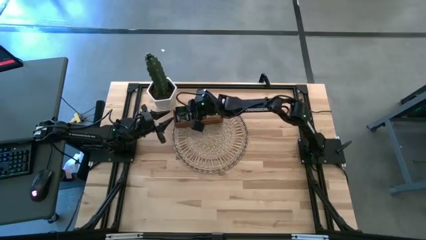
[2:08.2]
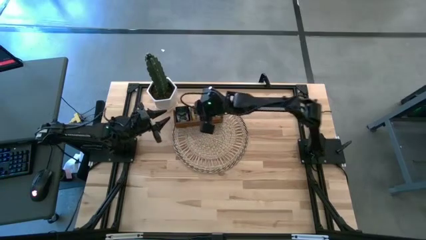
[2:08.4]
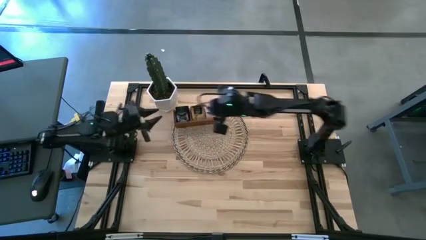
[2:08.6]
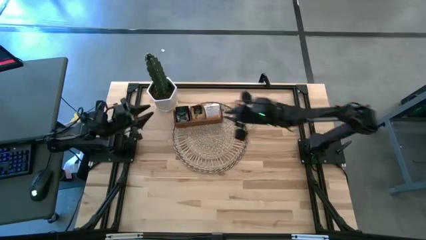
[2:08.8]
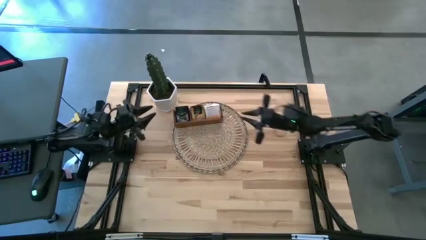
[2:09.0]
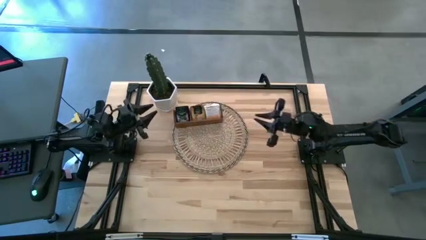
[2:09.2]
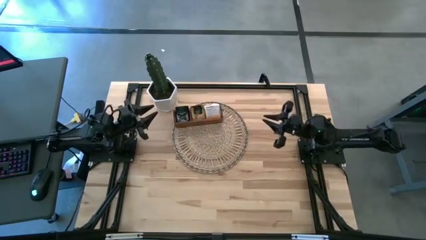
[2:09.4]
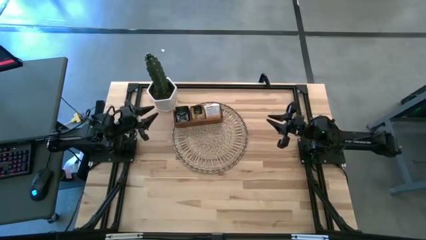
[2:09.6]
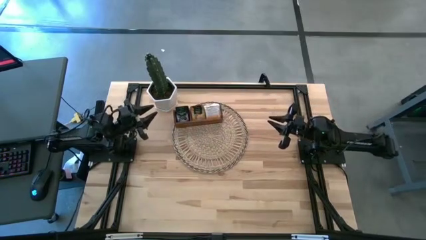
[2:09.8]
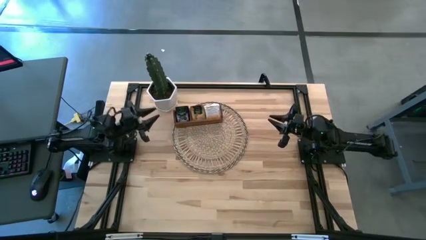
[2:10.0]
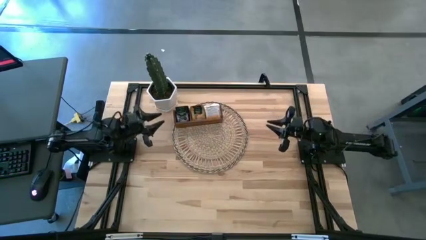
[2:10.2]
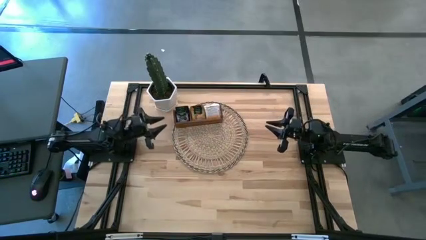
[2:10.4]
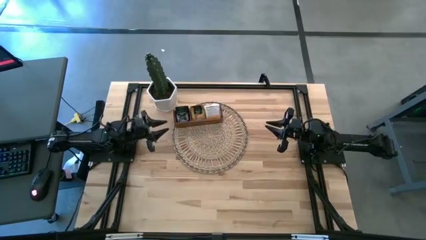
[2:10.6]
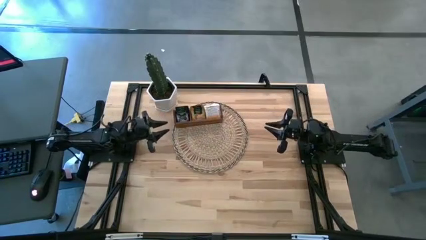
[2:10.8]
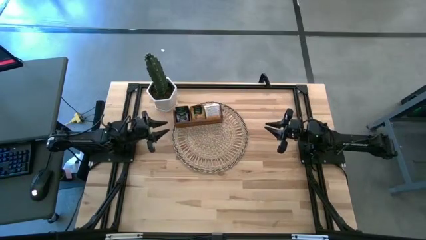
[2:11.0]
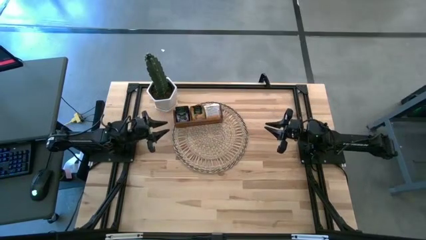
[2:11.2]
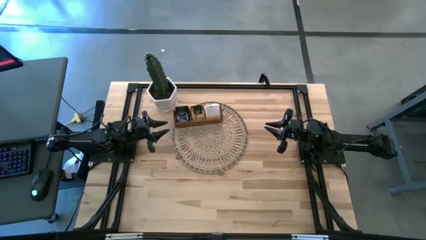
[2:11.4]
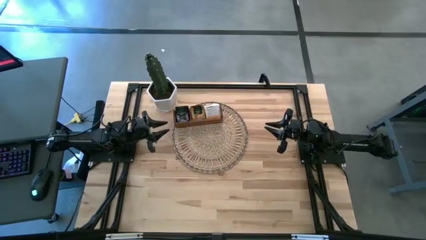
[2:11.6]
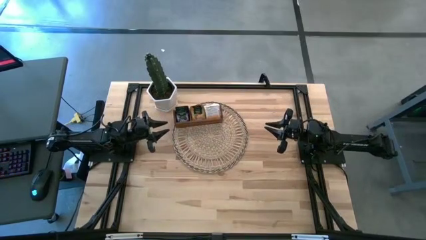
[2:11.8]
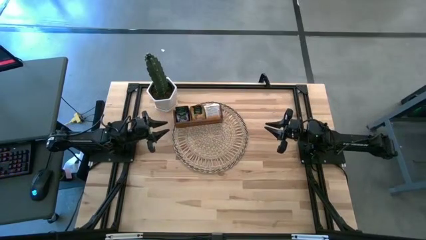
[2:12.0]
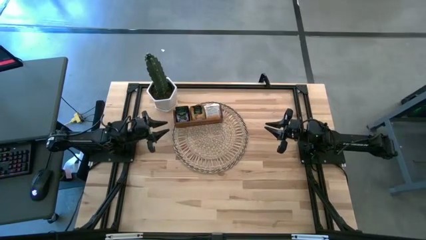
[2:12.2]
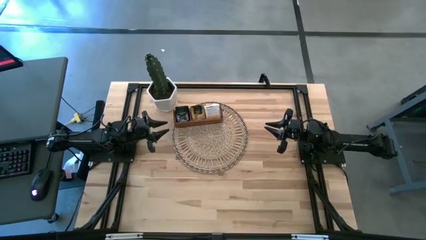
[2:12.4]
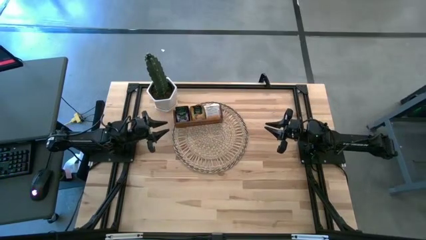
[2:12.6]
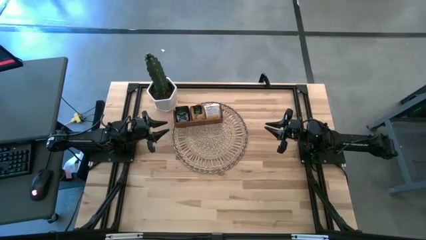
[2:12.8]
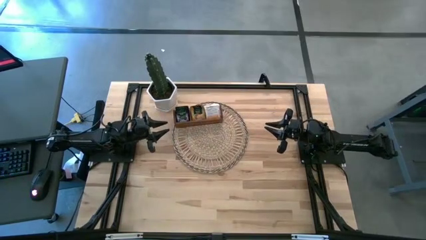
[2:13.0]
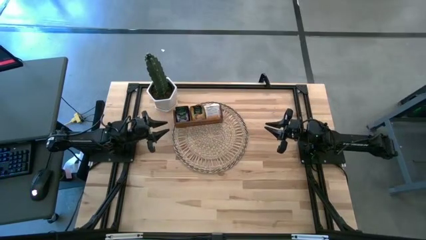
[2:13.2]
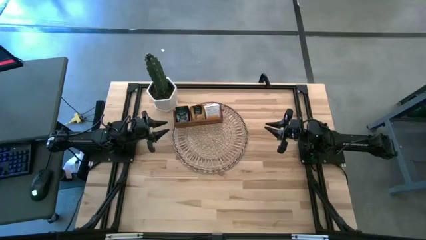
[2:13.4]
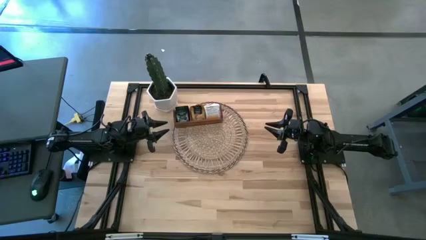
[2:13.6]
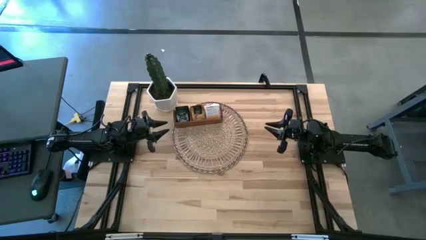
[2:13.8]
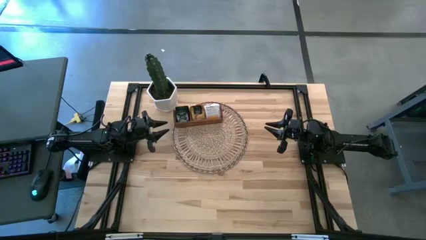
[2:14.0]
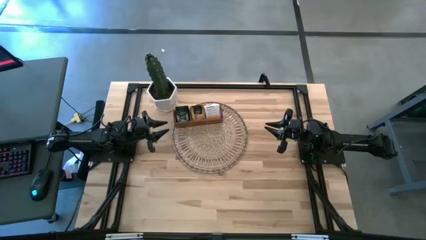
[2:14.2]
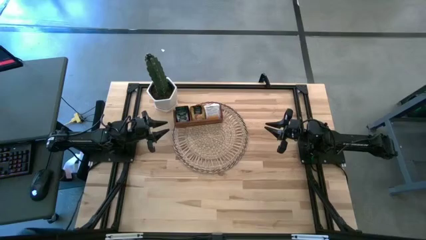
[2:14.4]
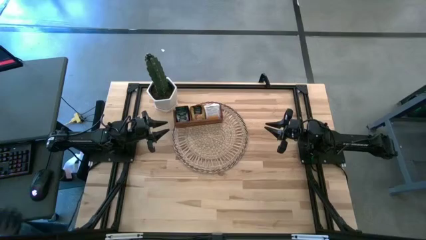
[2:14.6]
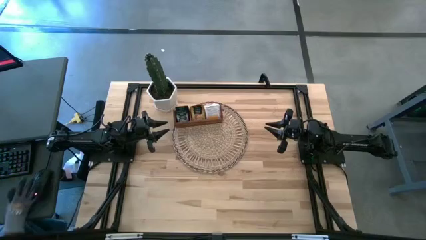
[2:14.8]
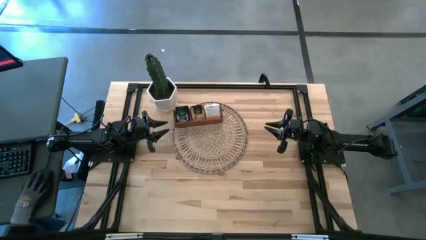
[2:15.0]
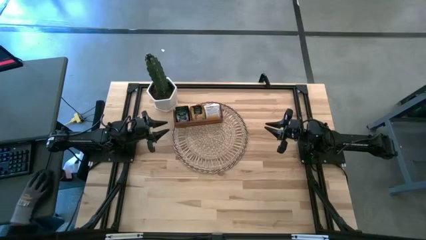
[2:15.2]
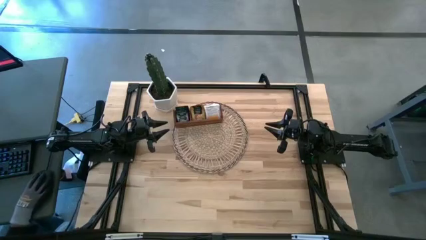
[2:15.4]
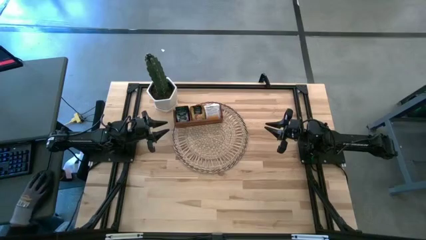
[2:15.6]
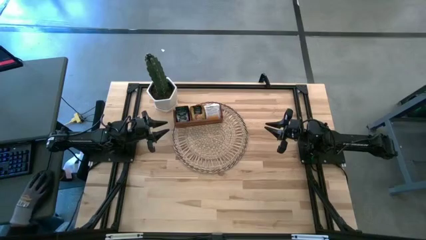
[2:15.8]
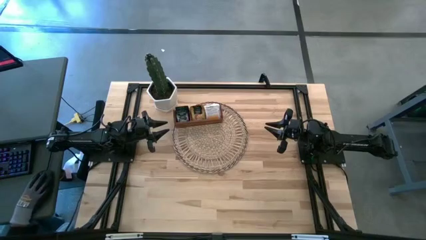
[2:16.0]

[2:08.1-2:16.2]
Task: Pick & Place Tea
Return to Home Position

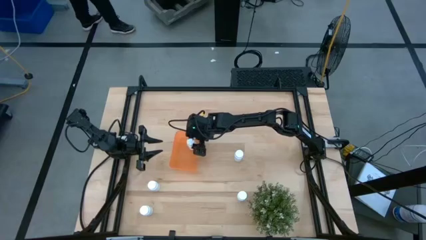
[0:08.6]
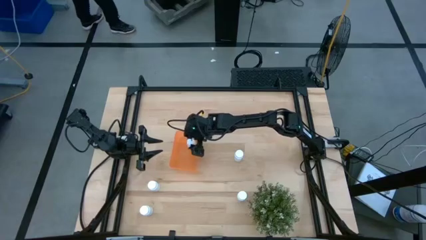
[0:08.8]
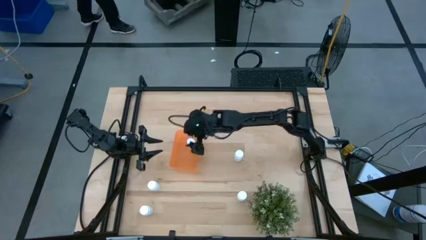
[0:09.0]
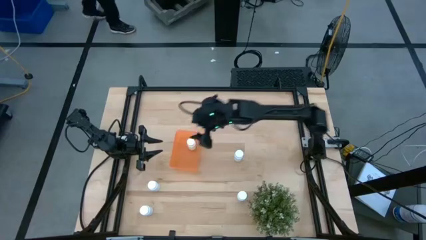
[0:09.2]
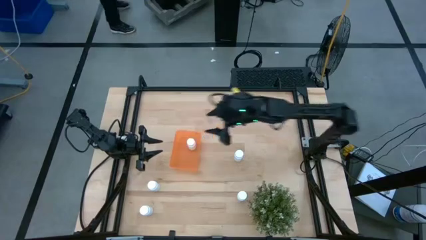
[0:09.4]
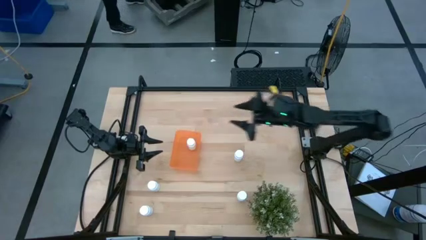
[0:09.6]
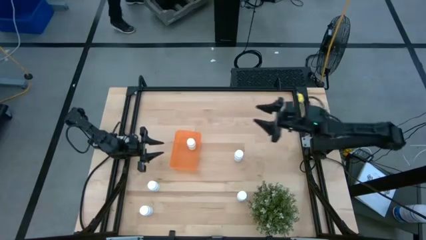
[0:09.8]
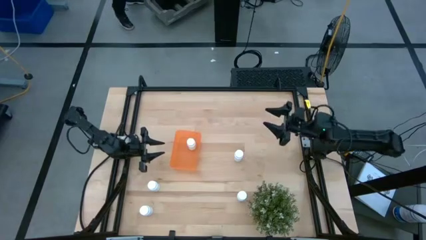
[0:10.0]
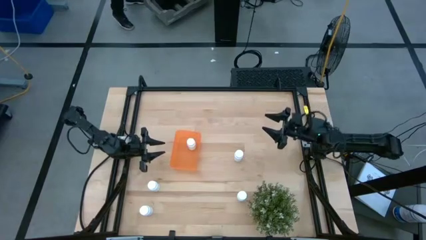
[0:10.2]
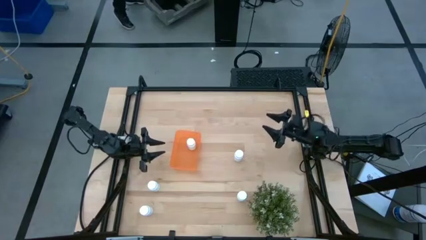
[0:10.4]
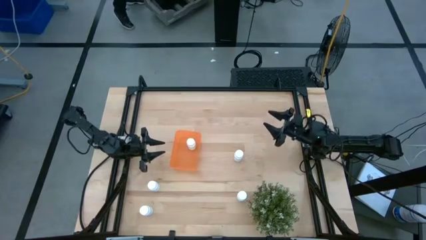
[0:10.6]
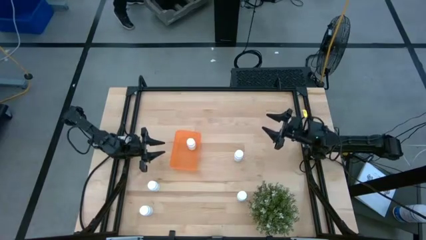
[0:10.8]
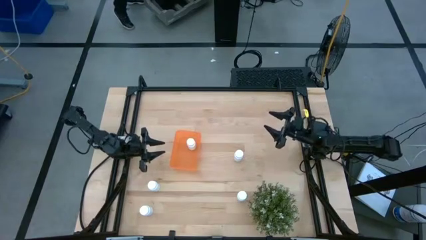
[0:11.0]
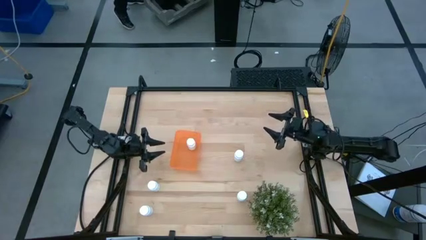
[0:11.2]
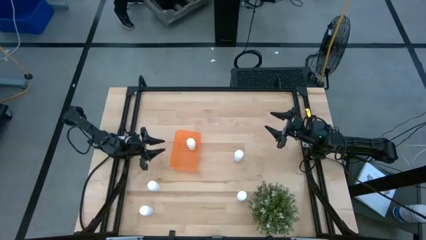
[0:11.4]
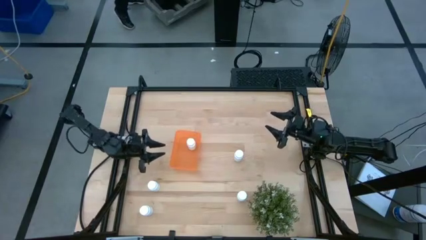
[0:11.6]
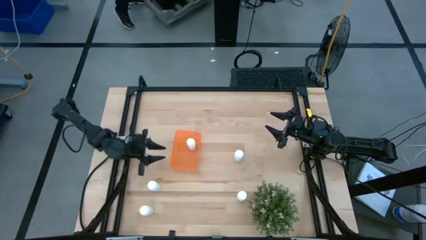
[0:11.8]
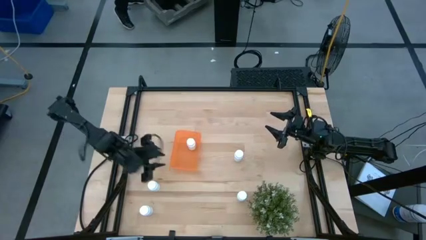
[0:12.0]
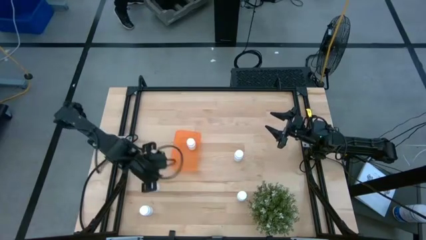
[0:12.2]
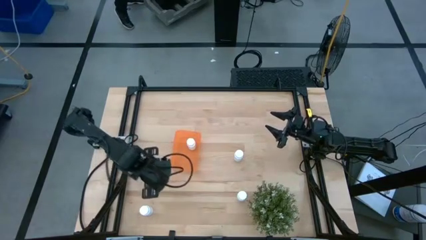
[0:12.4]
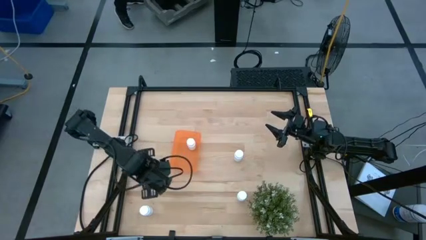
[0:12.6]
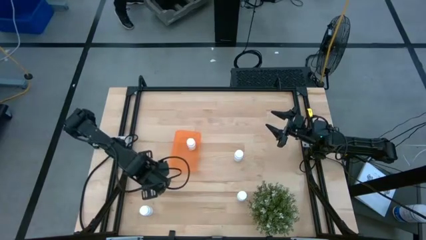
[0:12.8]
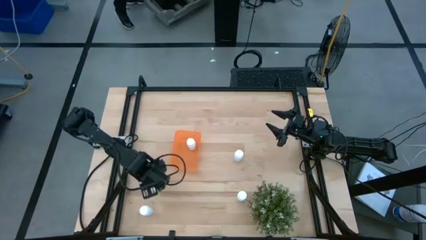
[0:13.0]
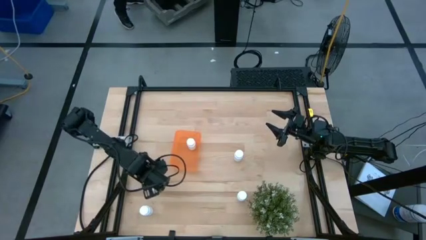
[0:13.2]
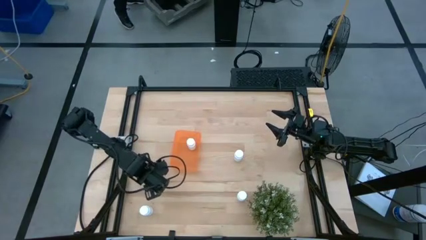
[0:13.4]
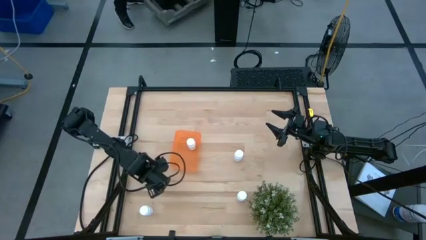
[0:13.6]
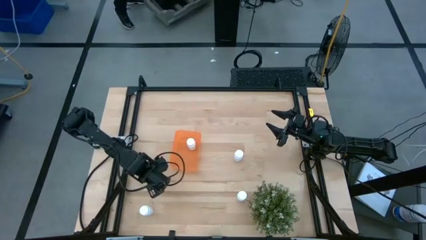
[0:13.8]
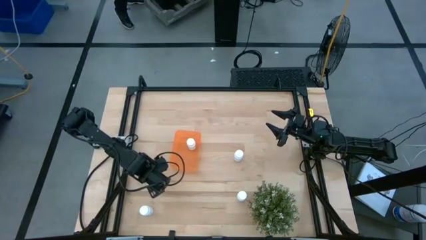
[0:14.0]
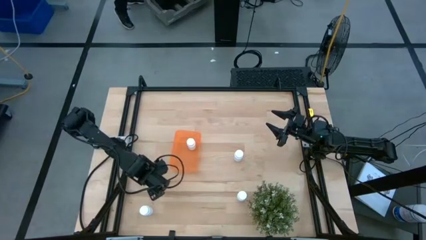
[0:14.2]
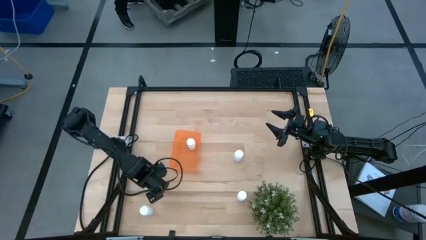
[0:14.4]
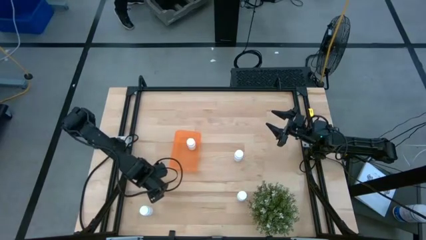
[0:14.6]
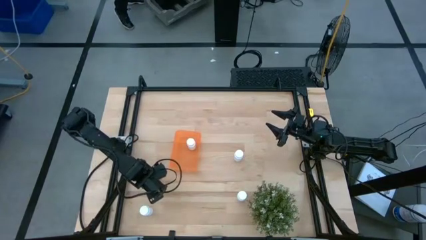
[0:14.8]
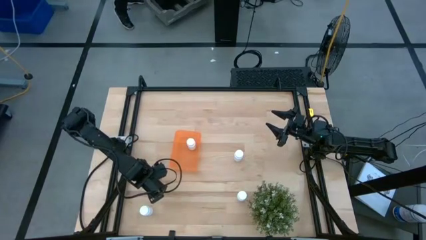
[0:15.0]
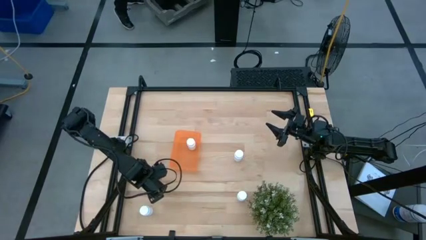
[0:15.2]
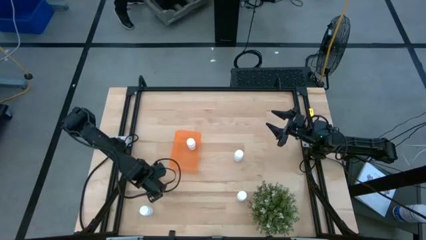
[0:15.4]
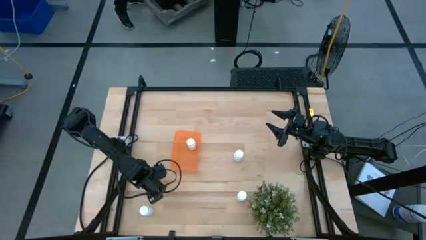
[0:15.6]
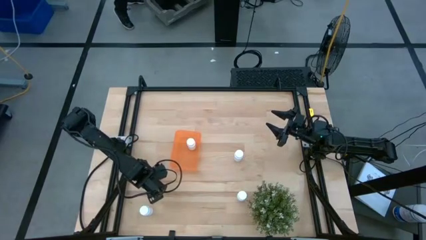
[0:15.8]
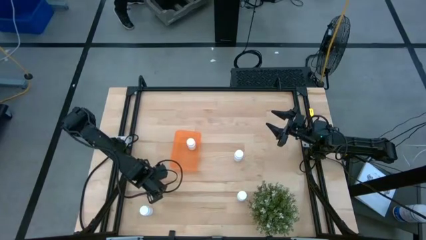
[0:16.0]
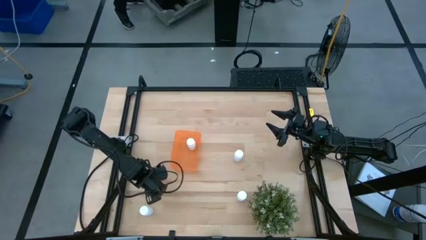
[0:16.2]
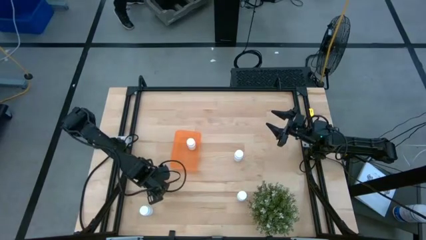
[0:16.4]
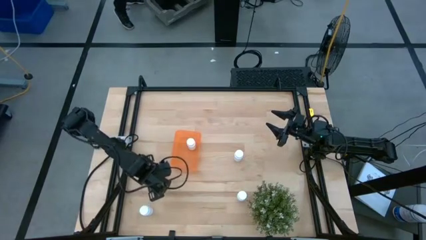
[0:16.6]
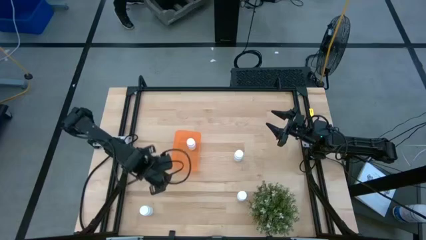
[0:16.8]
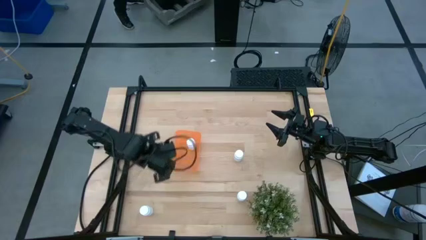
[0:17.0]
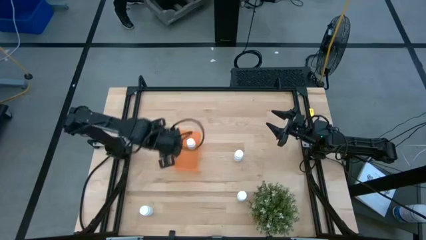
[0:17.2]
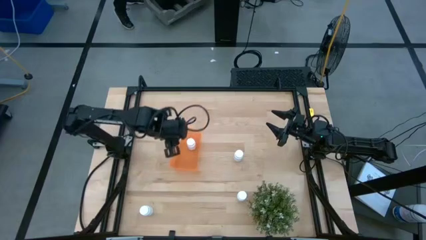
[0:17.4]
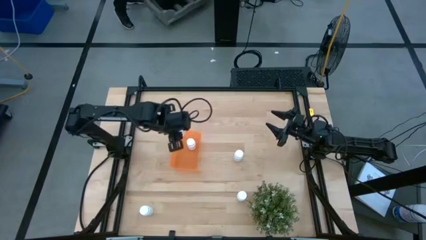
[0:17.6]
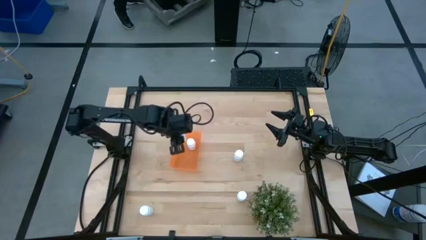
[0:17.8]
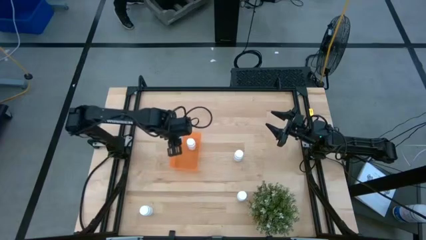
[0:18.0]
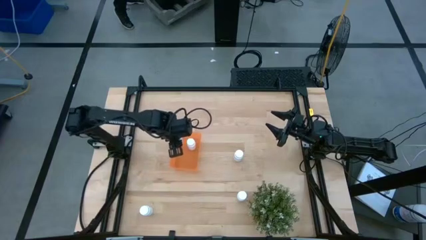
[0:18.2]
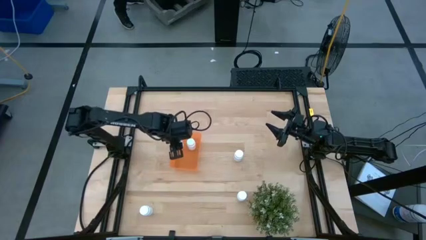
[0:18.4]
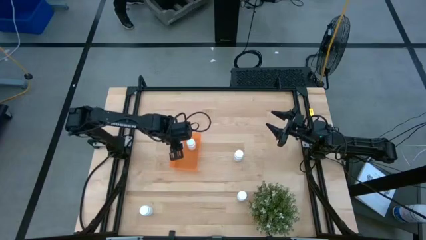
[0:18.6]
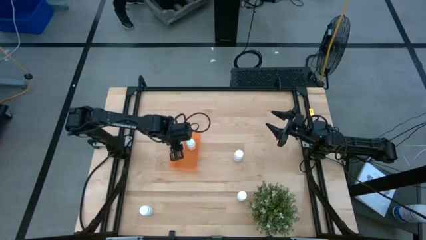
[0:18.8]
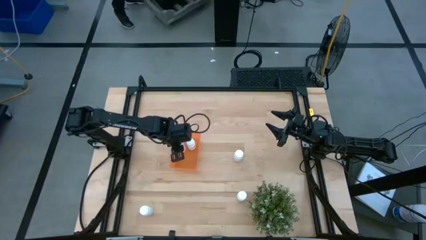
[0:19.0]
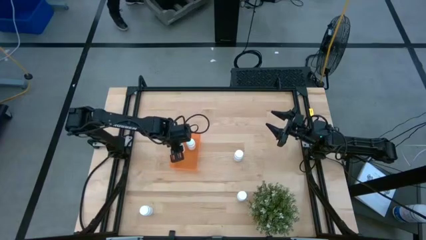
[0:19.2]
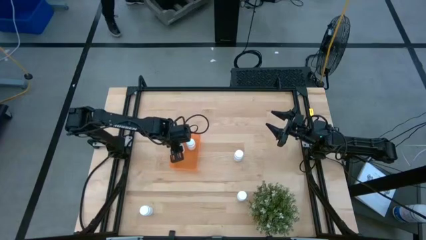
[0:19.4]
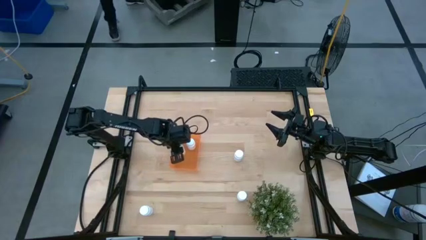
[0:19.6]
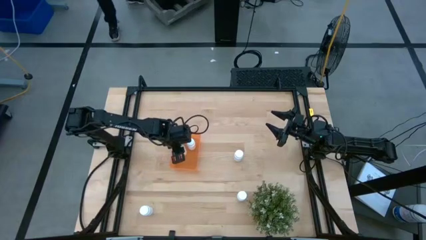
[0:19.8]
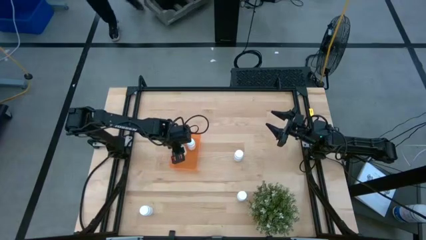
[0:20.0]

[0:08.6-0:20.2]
Task: Pick and place pill bottles into a basket
Put the white medicine bottle into the orange bin
